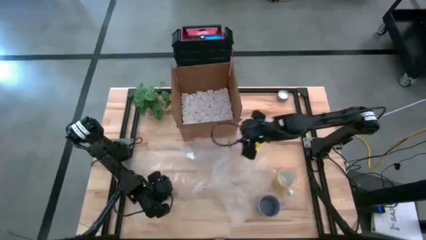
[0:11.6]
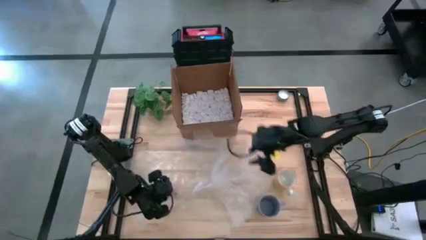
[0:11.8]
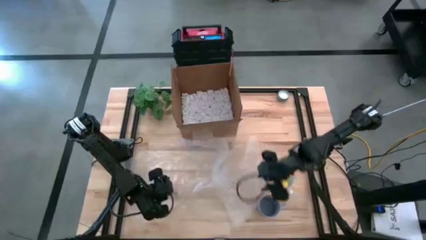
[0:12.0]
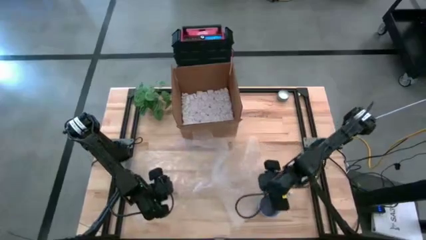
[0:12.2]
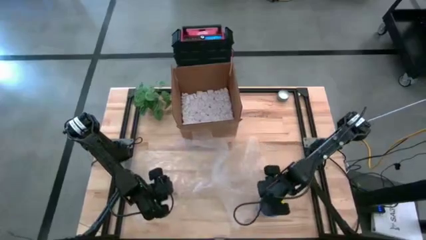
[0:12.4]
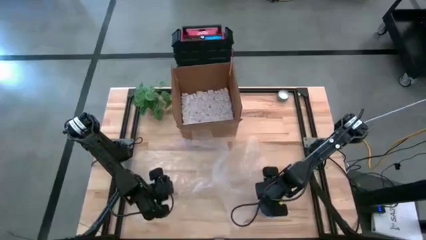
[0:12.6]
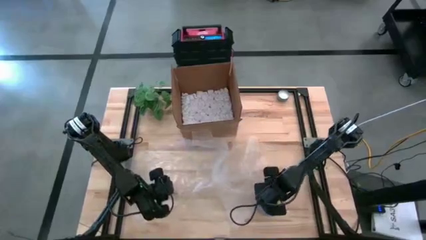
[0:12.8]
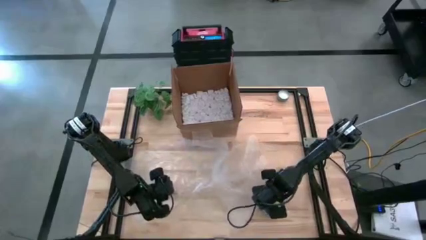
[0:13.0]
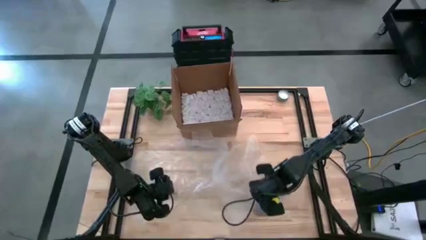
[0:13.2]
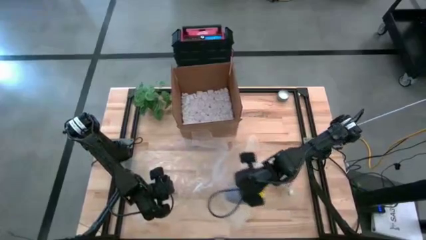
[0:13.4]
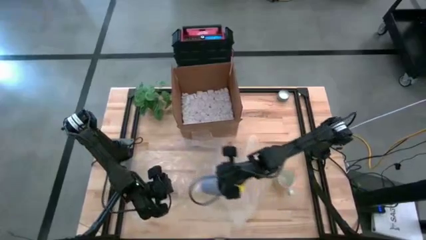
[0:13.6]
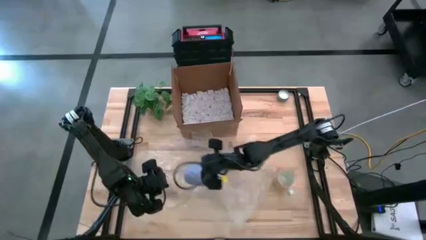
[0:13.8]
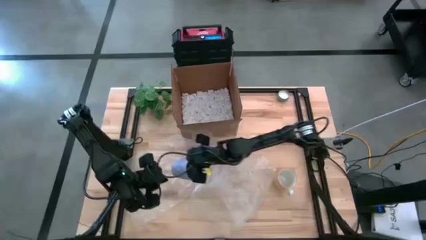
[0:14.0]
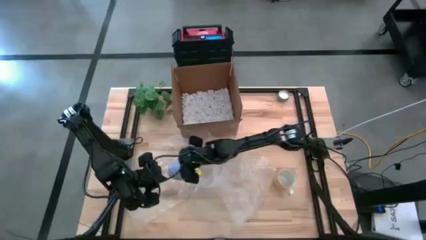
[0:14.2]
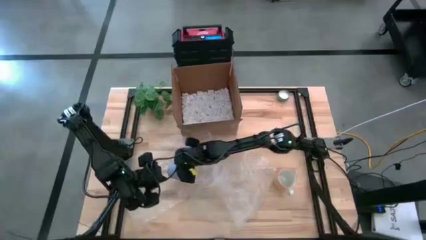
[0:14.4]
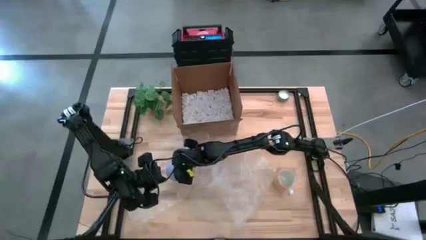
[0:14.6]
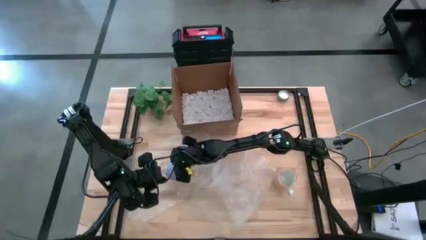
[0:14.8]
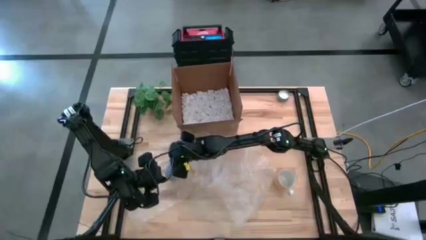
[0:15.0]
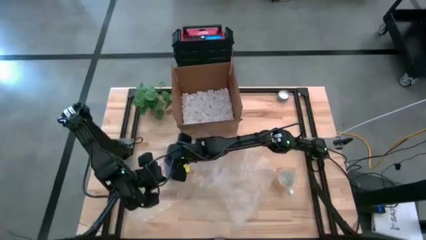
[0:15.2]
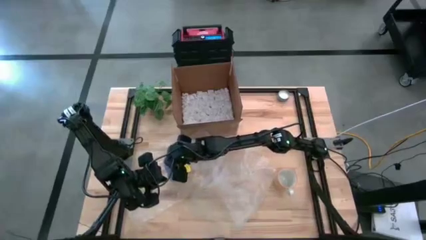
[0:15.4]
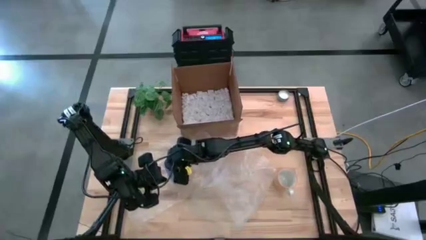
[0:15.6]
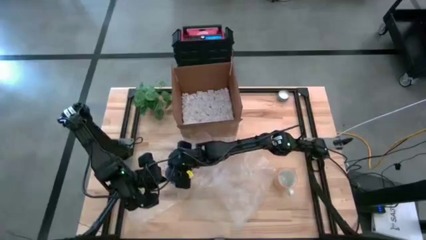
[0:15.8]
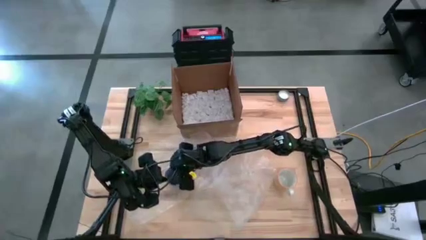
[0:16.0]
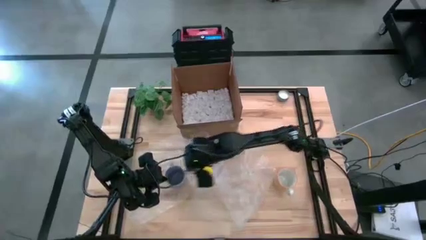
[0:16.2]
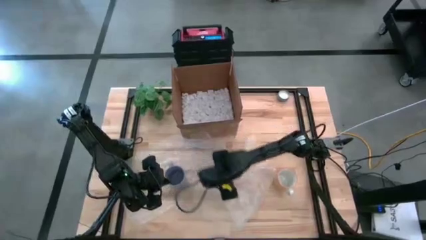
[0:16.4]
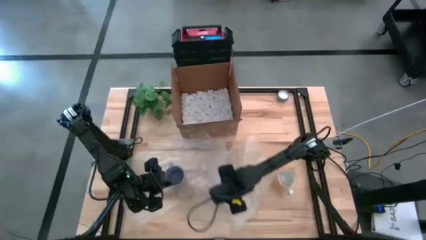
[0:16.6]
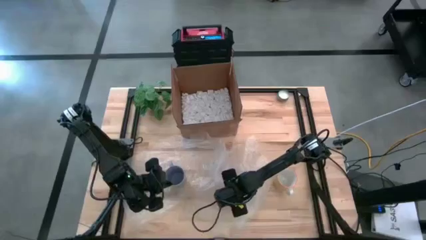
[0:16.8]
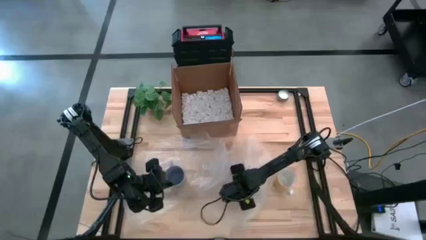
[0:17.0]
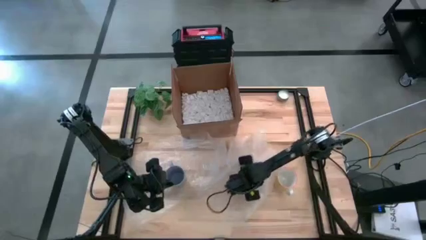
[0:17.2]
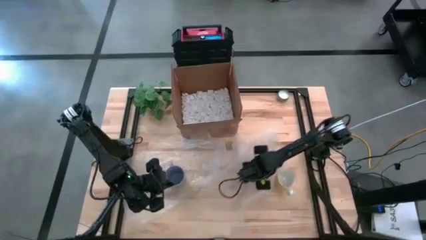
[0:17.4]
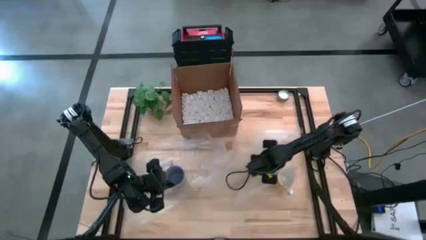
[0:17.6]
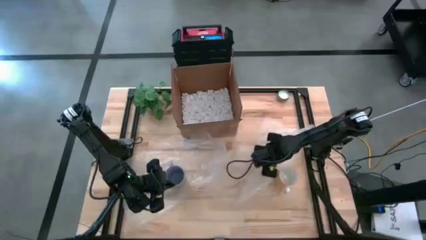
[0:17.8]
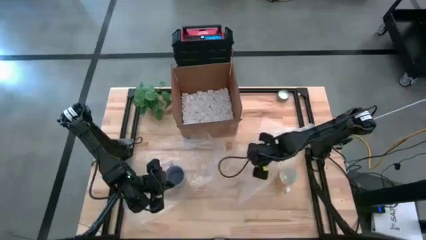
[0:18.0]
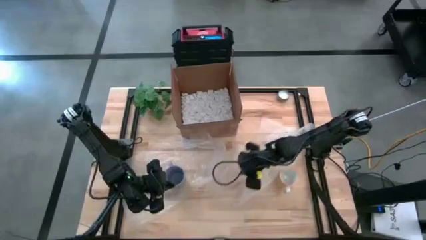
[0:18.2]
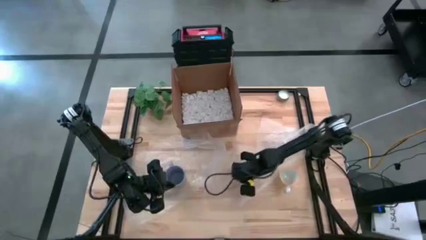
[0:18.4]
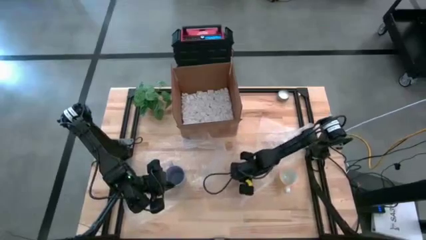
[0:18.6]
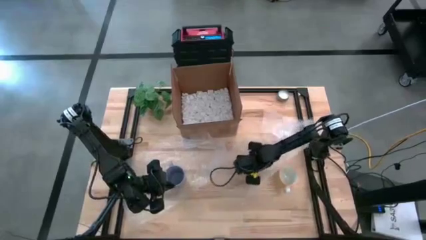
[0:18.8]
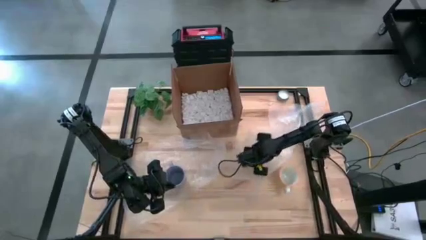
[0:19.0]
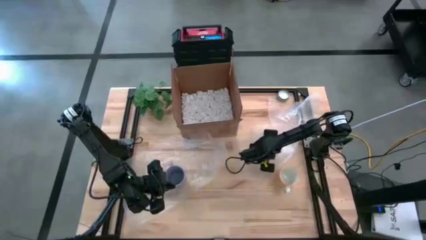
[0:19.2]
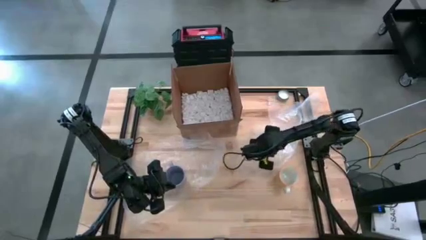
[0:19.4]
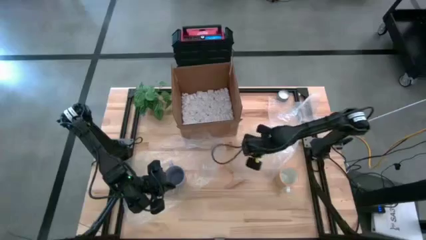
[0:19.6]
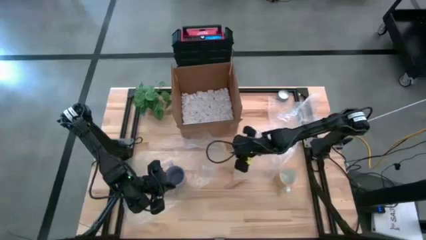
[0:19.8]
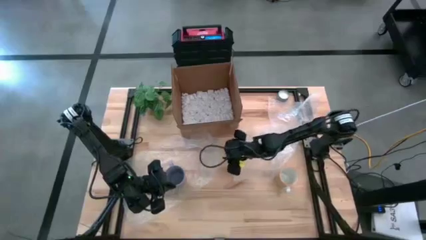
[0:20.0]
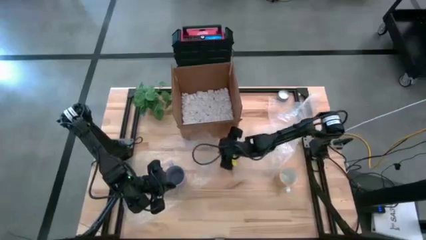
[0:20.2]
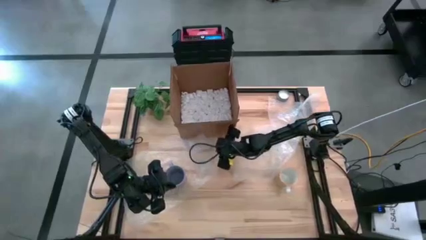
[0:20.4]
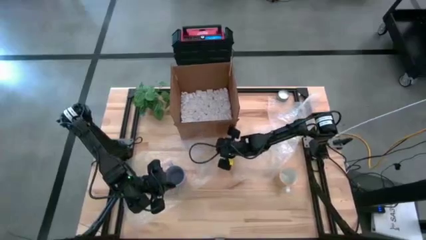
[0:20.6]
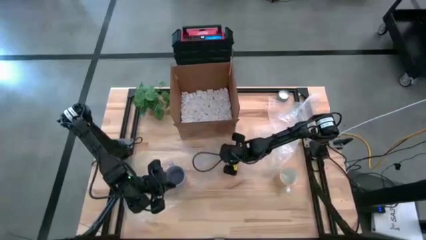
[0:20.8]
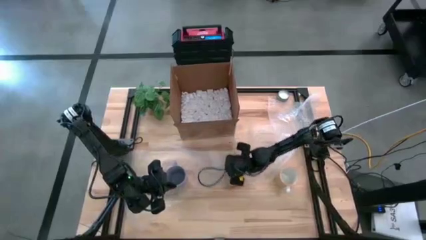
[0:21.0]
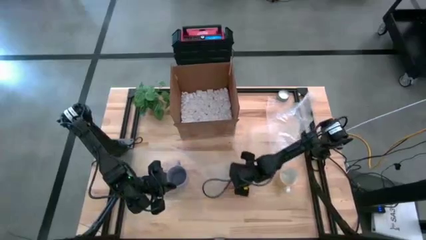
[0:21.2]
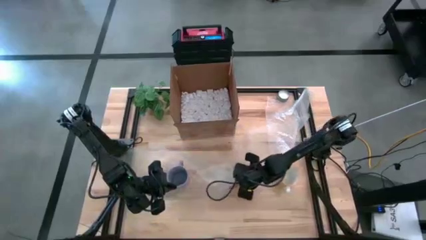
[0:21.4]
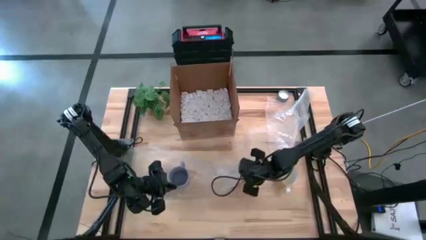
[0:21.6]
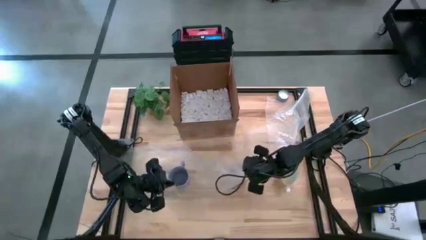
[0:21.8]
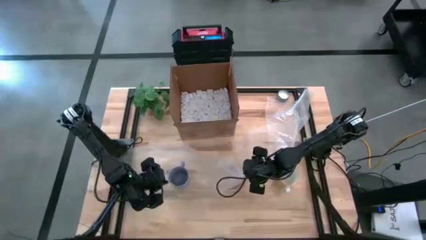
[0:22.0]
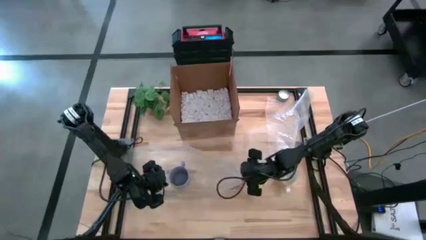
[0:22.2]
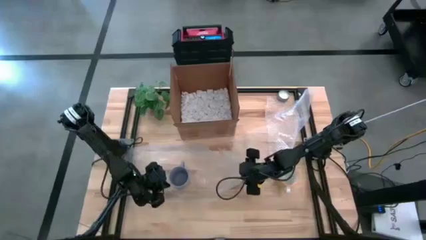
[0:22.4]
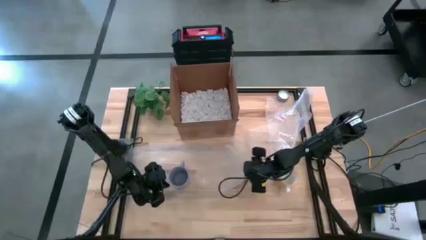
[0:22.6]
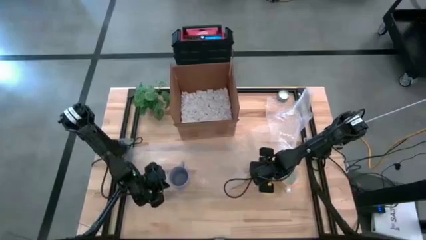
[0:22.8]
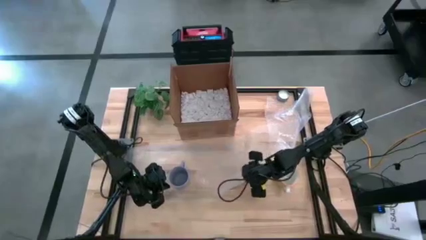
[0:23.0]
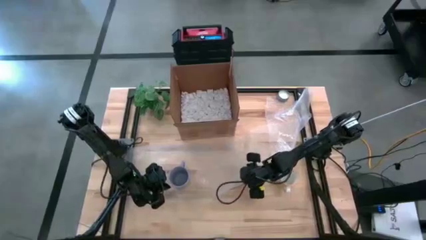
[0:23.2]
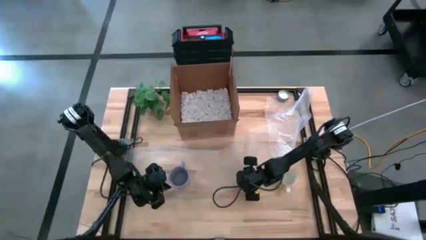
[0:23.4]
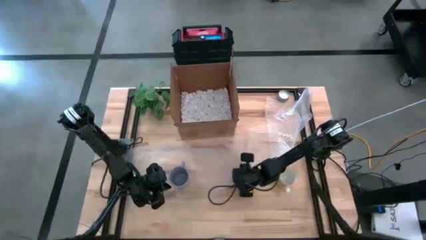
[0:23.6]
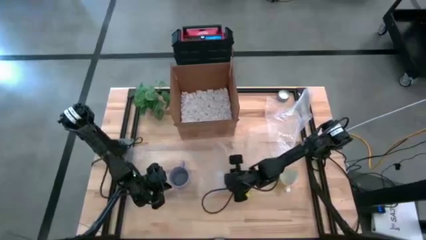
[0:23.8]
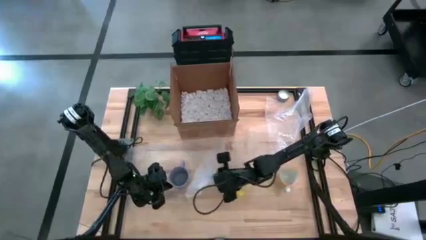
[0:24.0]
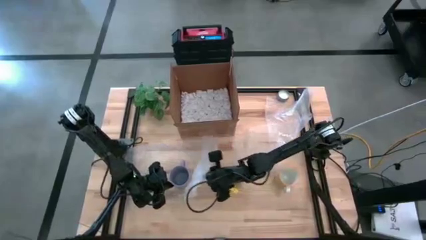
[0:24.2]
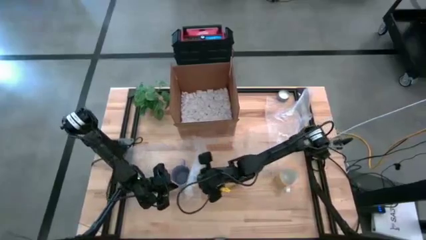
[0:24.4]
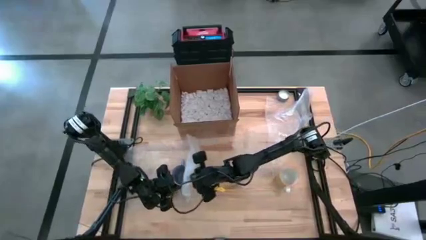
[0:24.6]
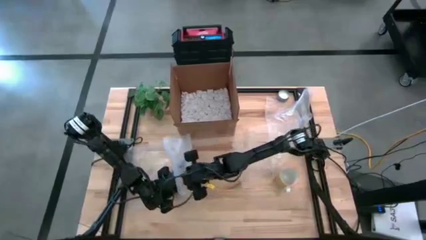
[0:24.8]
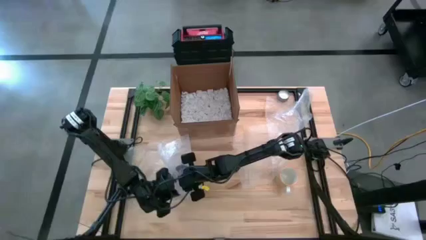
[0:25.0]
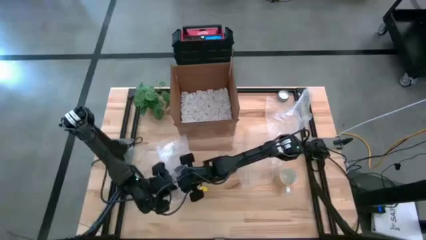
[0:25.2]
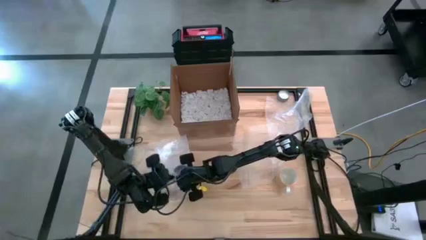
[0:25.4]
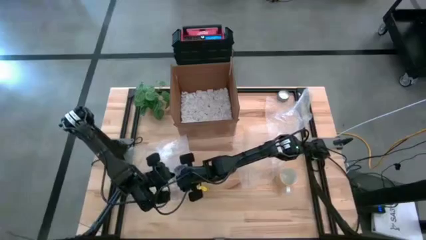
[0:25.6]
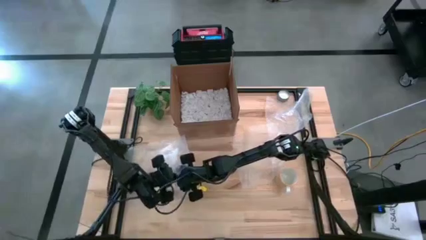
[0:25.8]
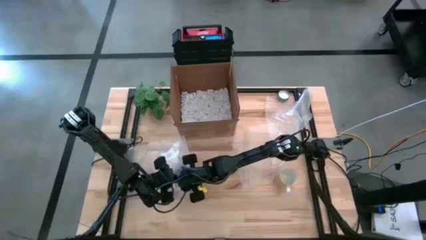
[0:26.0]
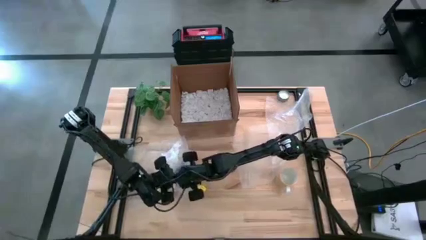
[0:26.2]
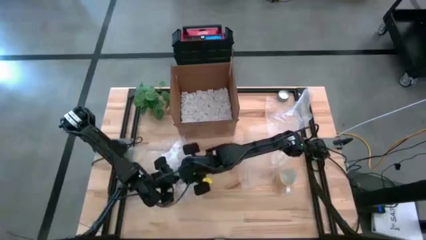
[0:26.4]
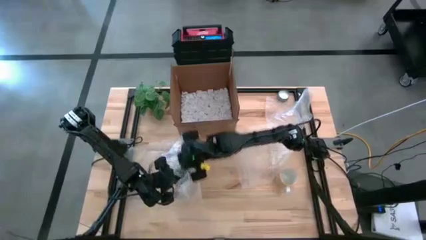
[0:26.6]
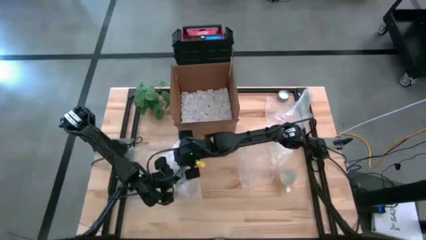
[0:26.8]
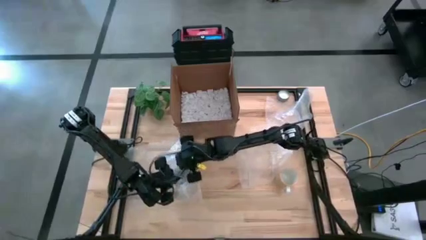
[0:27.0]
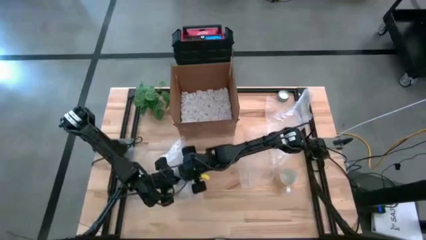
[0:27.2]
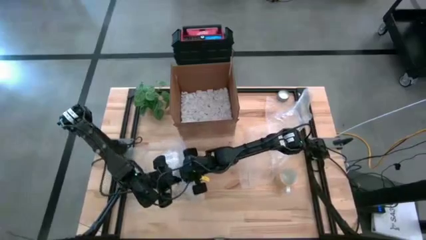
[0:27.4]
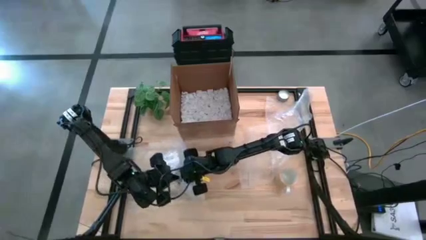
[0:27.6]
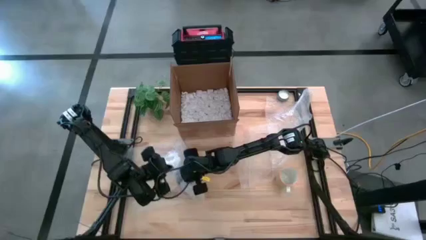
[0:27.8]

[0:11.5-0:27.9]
Task: wrap mug
Wrap the blue mug using the left bubble wrap
